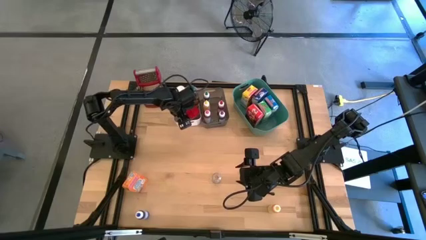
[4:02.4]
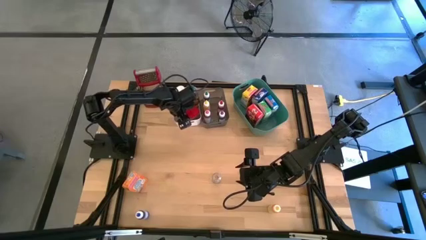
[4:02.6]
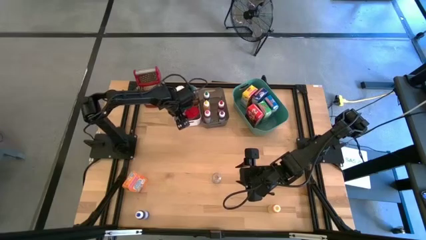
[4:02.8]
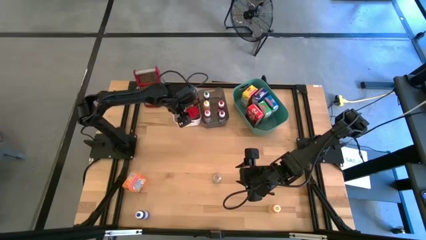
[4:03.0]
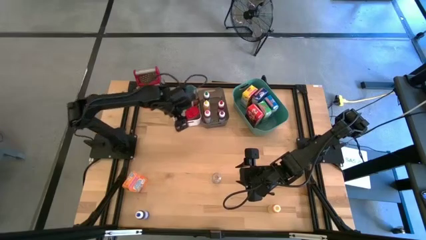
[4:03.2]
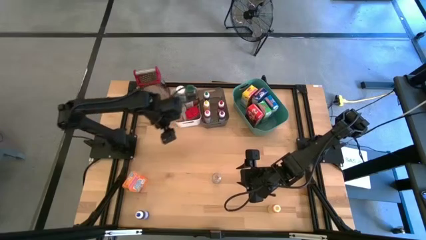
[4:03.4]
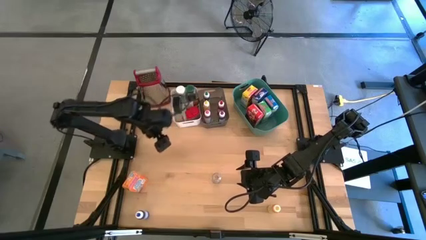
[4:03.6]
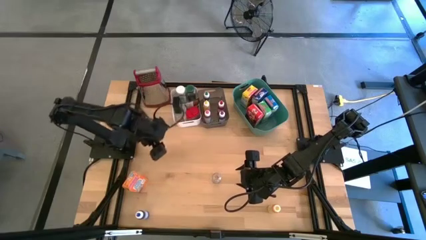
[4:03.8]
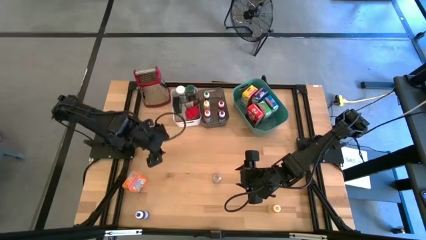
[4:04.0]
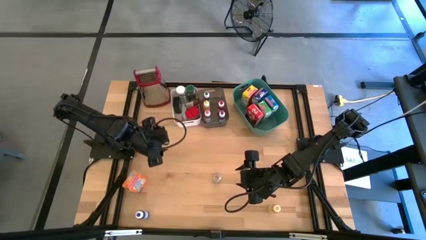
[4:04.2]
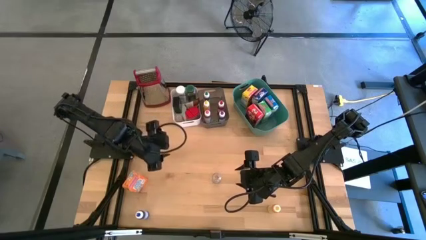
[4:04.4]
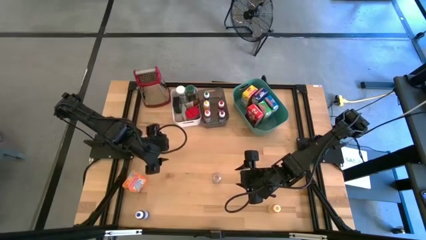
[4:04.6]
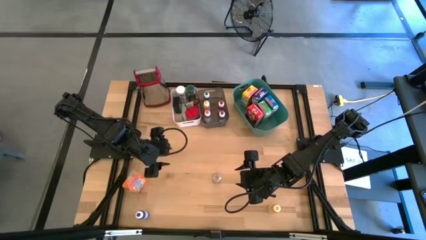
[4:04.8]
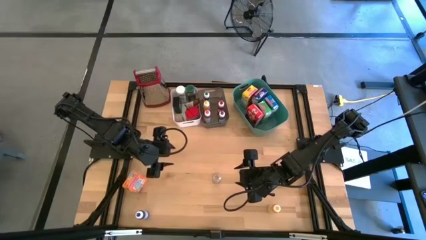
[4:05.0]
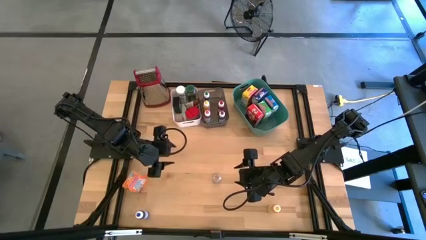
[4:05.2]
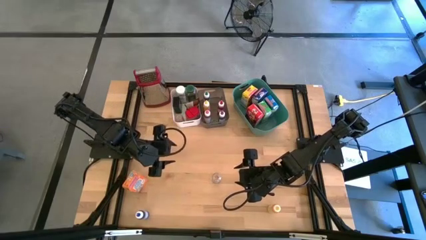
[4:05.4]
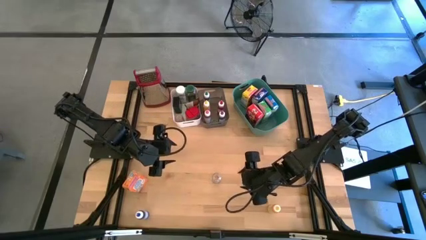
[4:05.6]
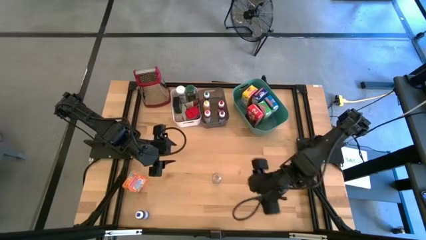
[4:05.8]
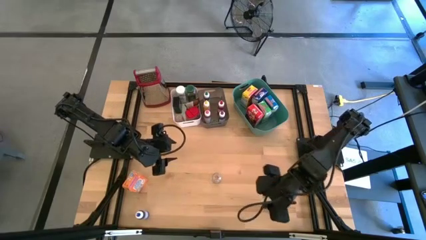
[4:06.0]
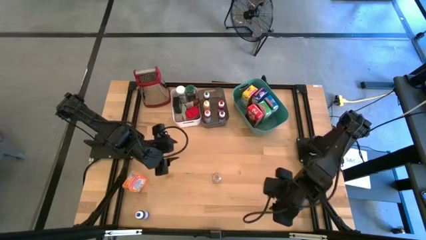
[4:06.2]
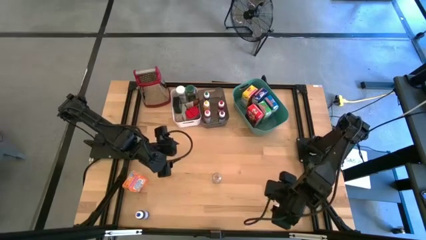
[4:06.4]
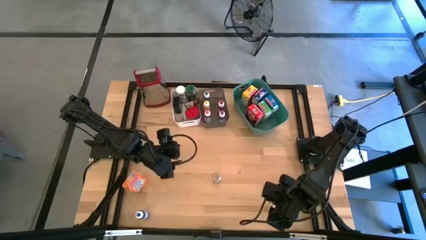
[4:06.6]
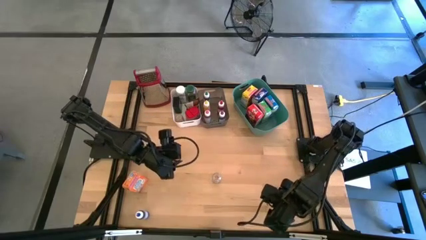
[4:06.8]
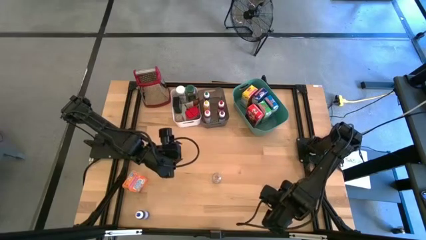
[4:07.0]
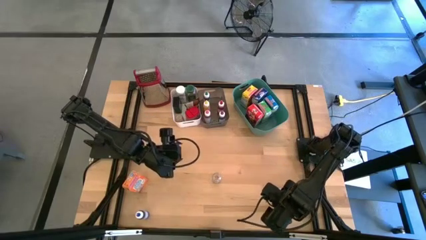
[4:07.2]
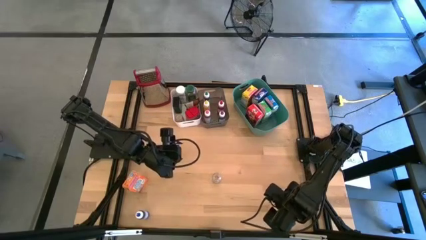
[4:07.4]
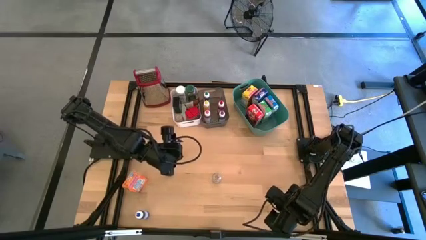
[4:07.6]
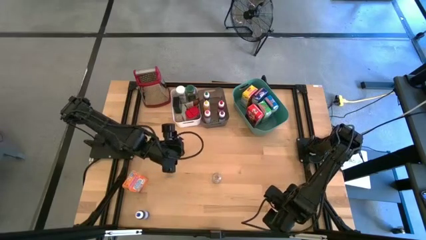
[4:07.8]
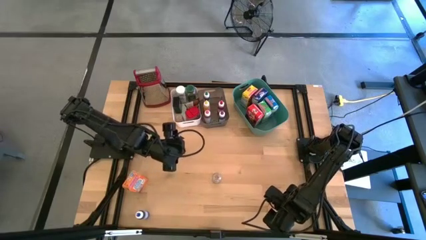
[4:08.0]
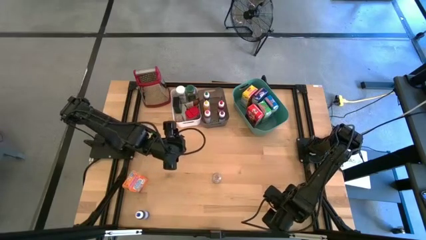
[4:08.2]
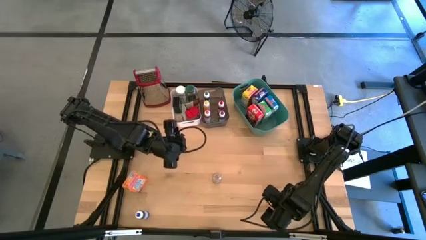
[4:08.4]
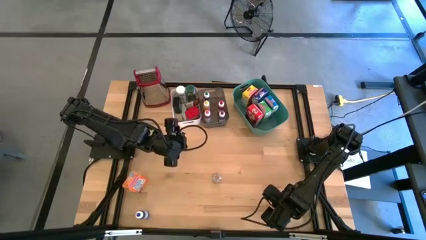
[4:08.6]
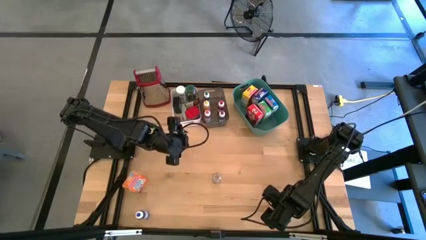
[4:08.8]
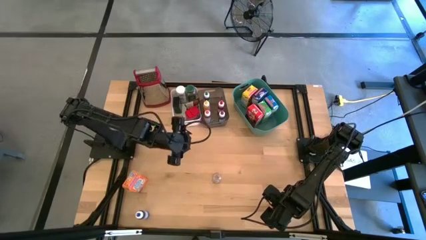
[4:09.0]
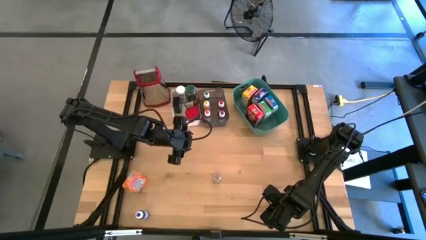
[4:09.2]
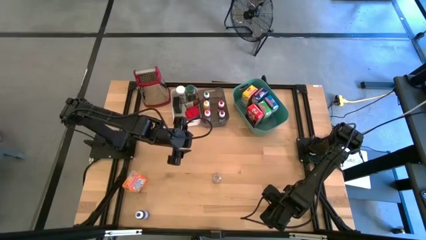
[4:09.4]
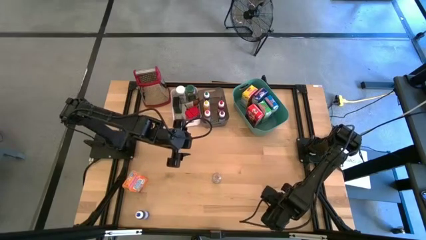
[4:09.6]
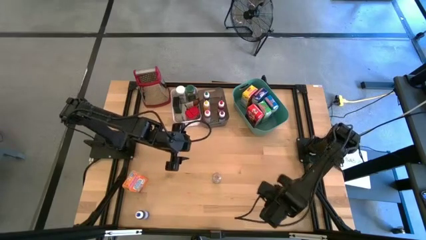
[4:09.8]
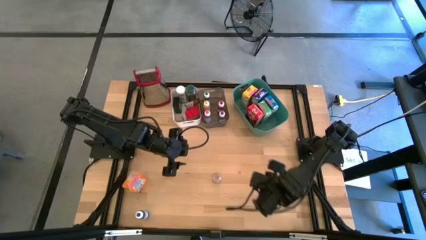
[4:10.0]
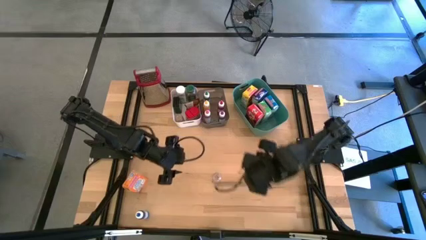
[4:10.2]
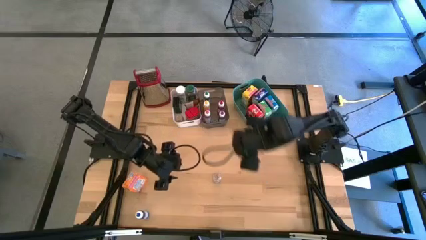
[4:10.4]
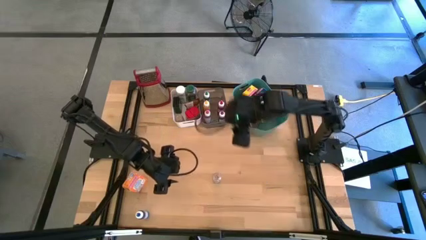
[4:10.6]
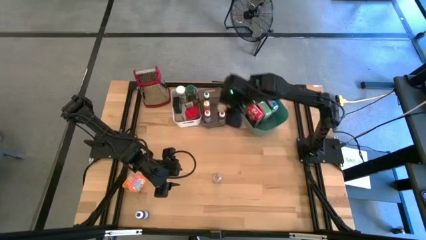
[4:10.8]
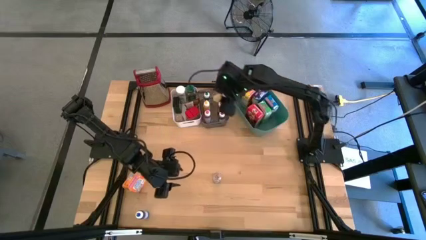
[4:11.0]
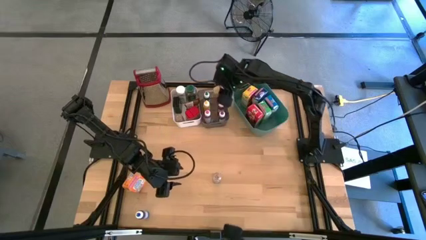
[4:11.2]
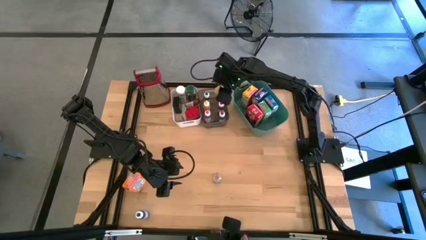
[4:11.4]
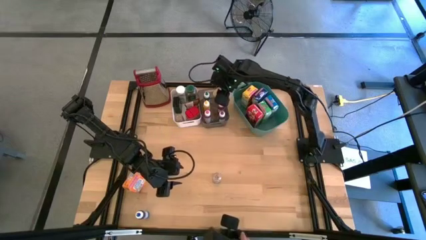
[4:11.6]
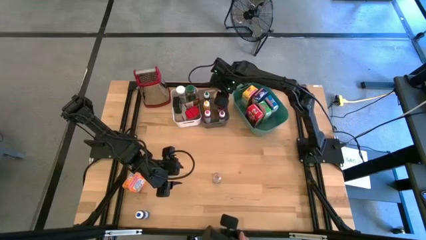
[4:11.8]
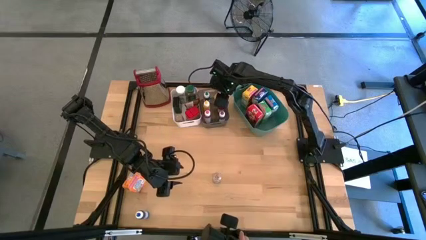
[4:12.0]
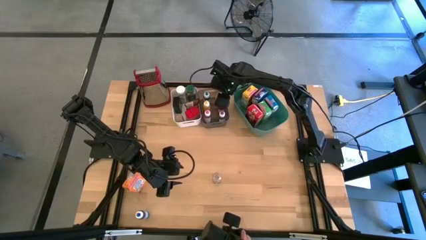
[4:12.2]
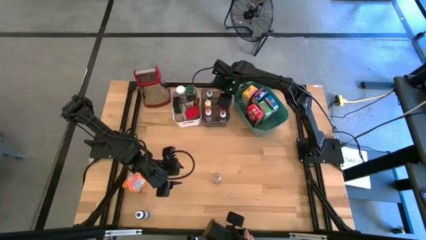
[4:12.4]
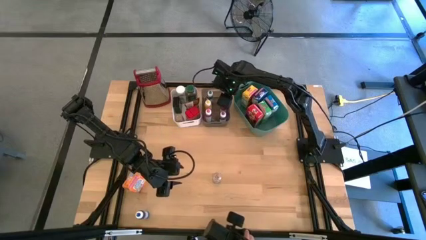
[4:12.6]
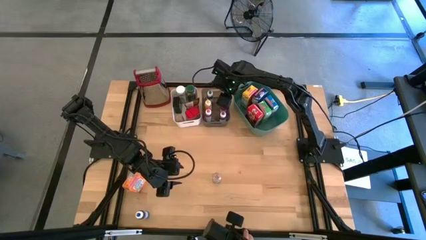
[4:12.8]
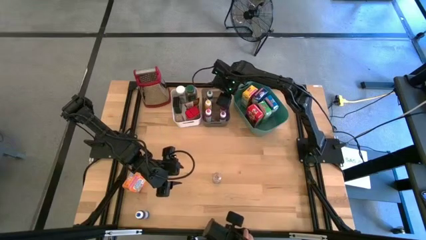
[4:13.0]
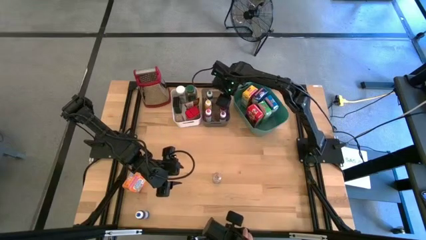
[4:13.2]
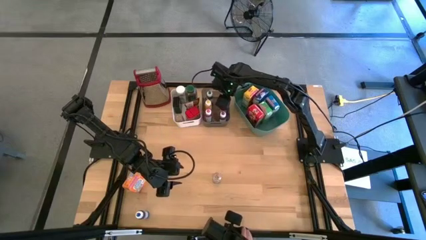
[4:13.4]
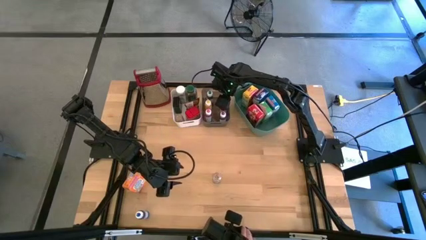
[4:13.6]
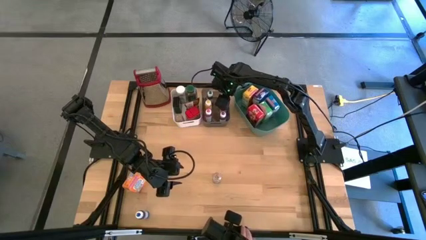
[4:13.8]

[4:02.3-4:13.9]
Task: Pick & Place Kitchen Items
Put the yellow food coloring bottle into the middle black transparent bin

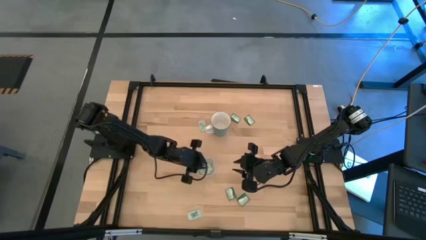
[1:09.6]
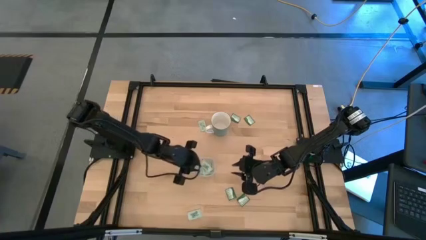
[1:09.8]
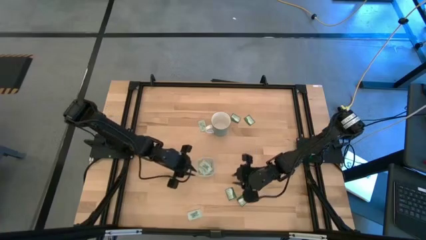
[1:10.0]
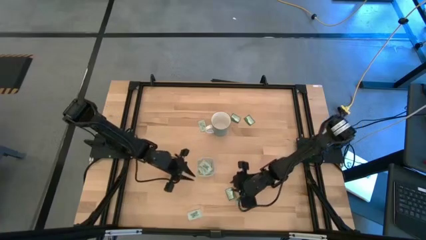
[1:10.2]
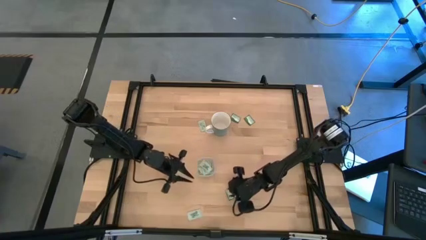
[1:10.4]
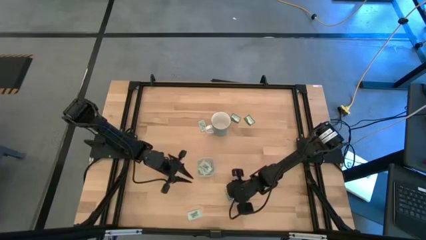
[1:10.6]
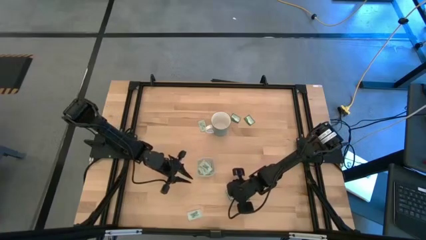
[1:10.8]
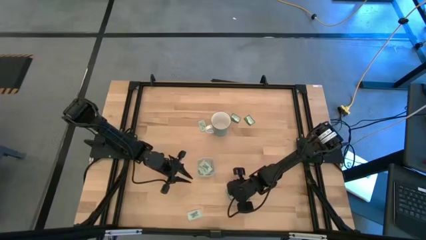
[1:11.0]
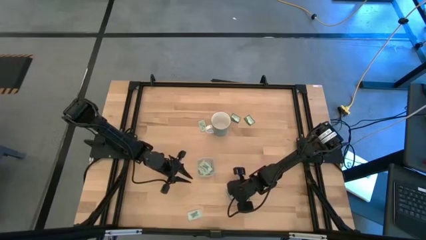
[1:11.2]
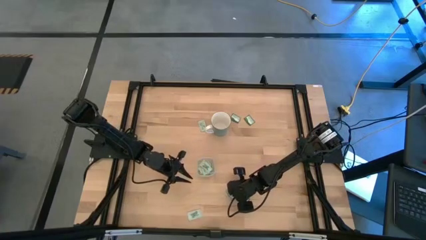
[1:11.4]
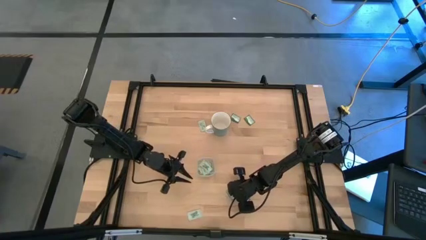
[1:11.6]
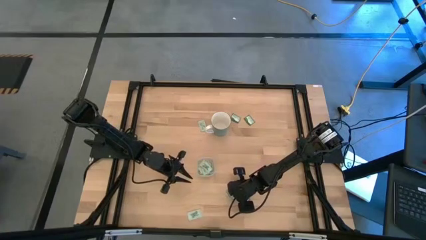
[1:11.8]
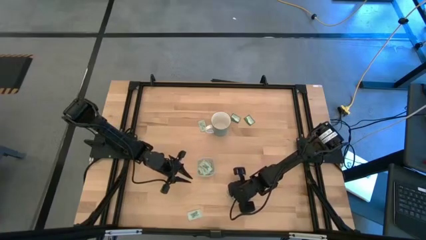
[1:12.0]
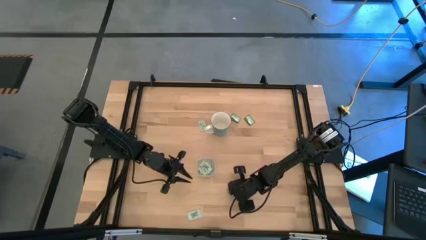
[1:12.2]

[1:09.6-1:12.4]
Task: Pick and place Stevia / Truvia into bins
Put the green stevia packet into the transparent bin

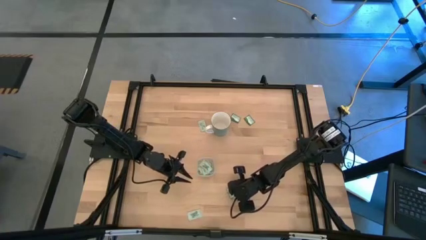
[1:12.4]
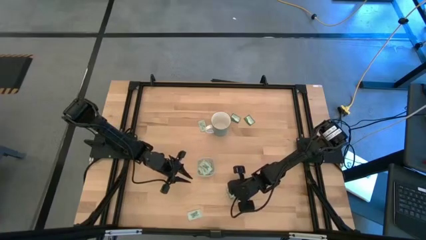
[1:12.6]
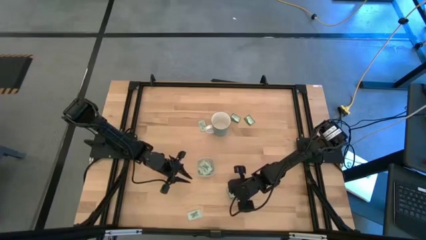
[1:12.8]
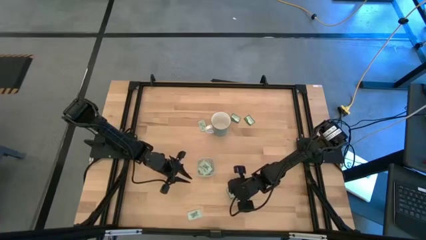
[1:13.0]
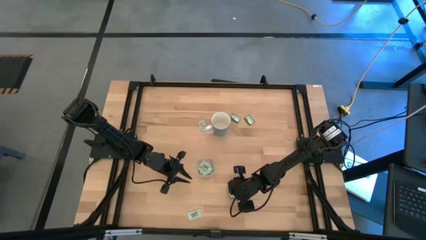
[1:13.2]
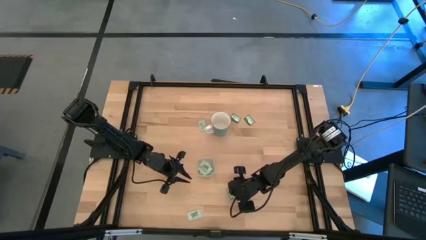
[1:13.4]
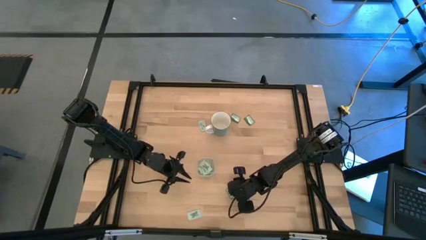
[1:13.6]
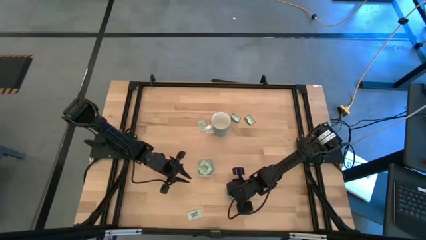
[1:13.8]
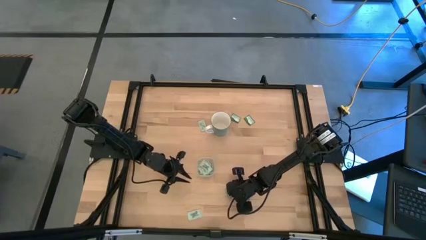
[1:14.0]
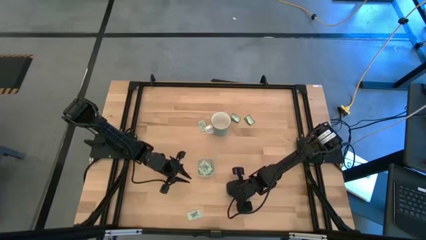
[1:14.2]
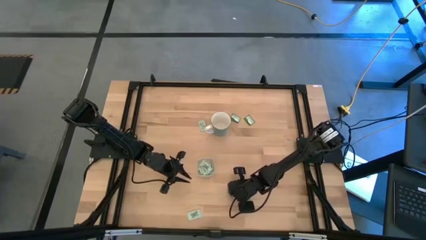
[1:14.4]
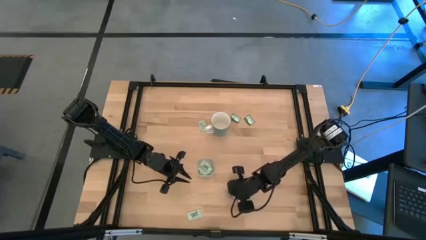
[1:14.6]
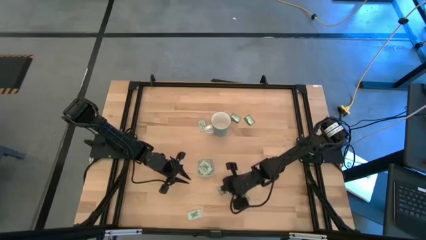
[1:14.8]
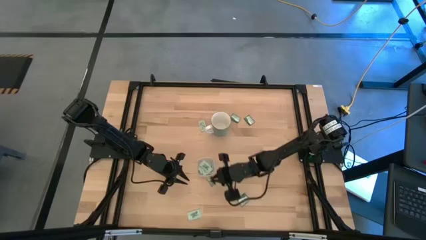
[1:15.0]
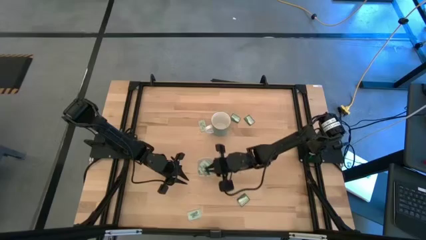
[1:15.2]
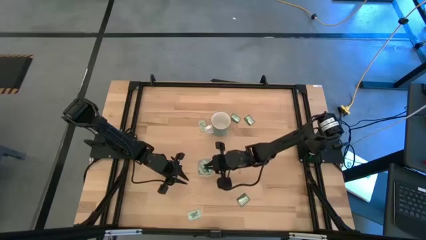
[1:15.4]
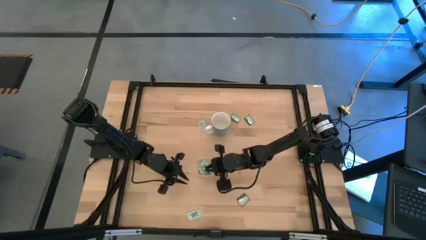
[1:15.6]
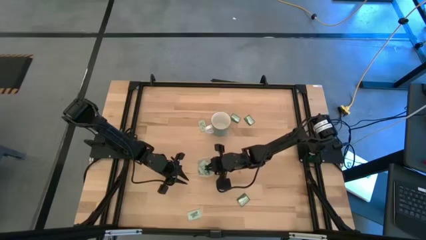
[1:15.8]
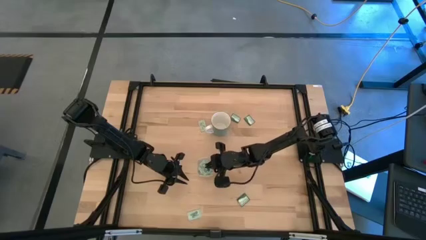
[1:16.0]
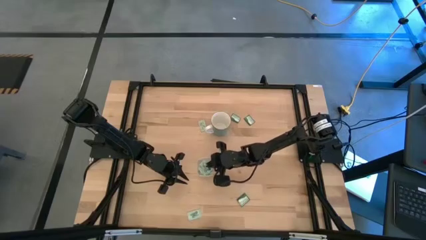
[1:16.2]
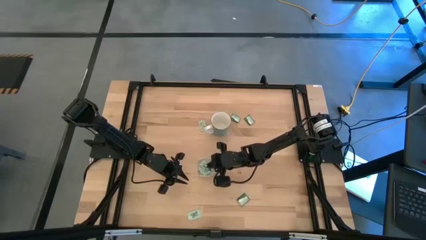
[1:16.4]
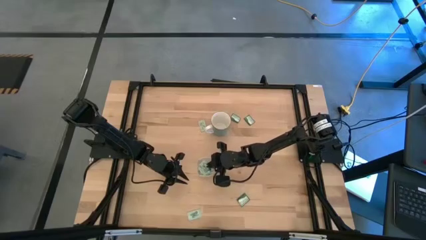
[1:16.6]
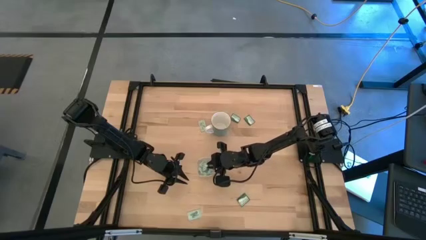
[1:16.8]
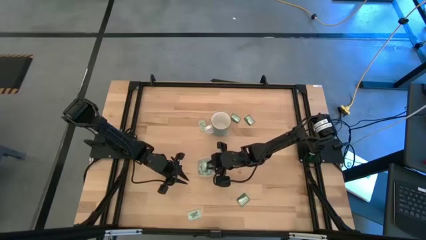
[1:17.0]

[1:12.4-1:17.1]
Put the green stevia packet into the transparent bin
